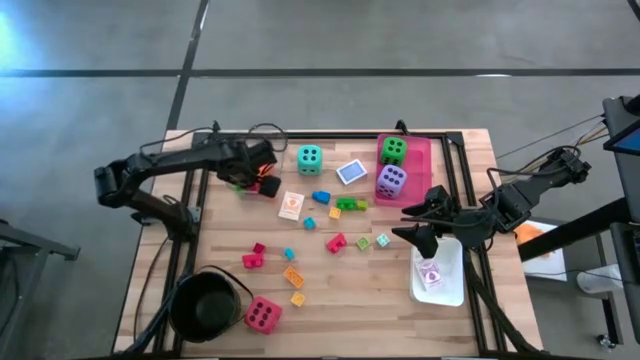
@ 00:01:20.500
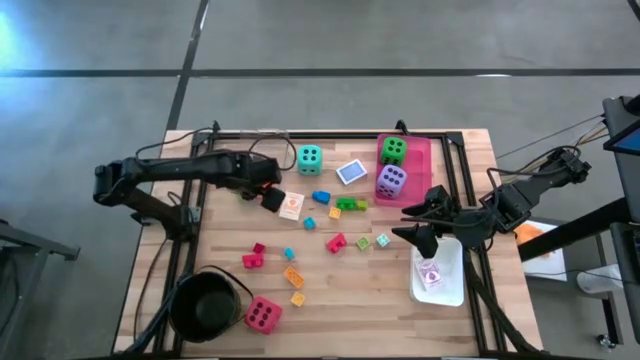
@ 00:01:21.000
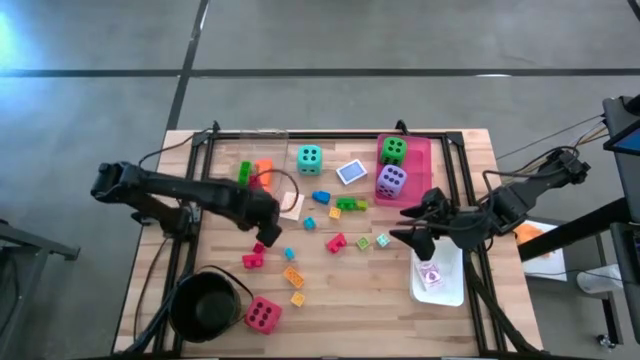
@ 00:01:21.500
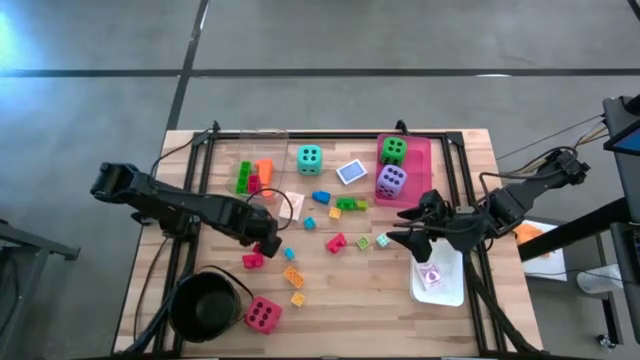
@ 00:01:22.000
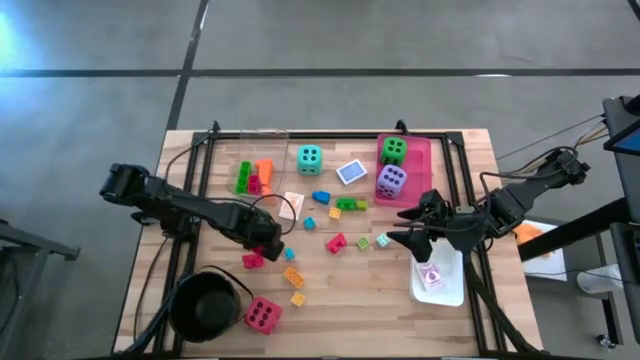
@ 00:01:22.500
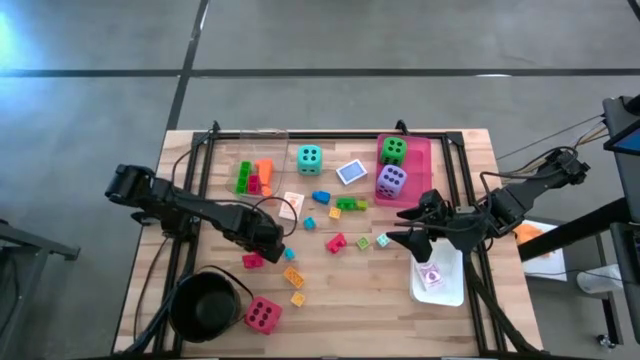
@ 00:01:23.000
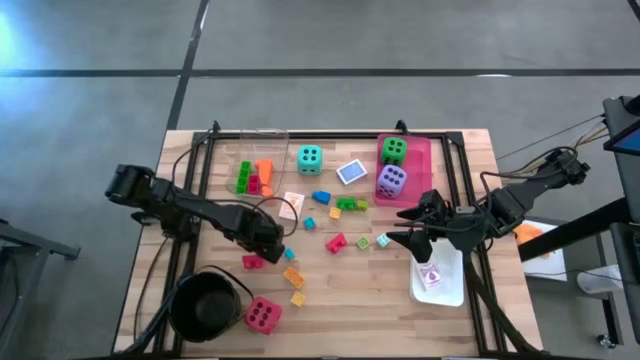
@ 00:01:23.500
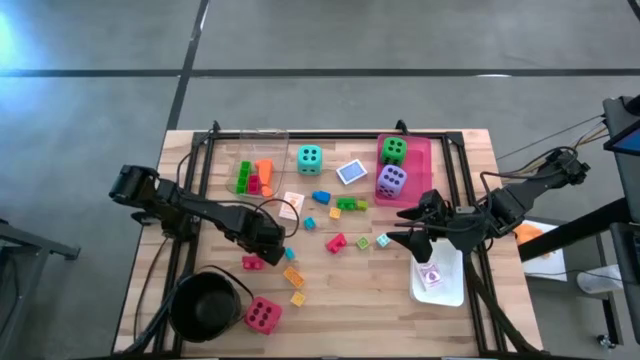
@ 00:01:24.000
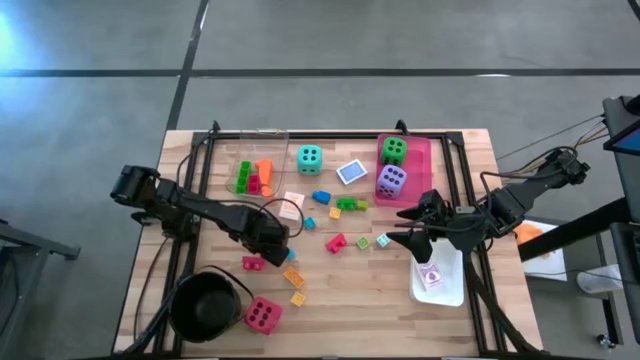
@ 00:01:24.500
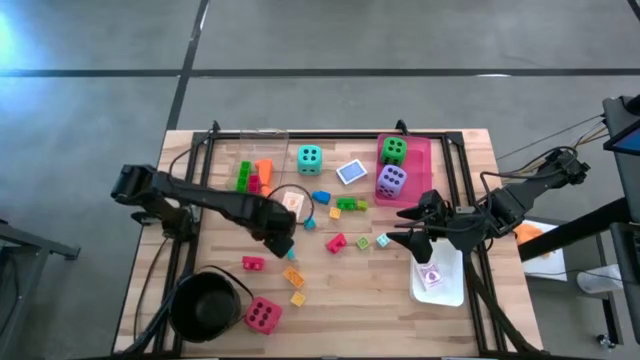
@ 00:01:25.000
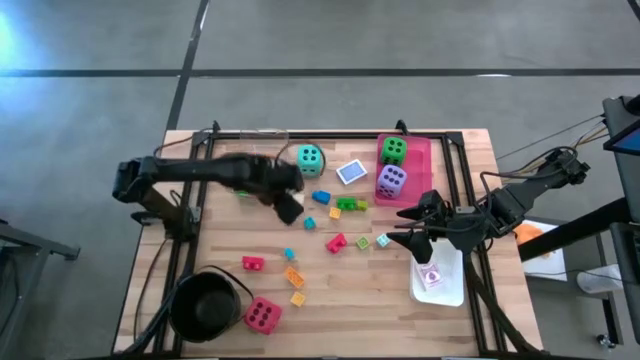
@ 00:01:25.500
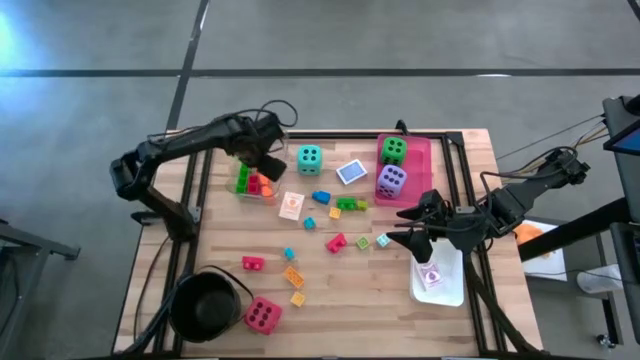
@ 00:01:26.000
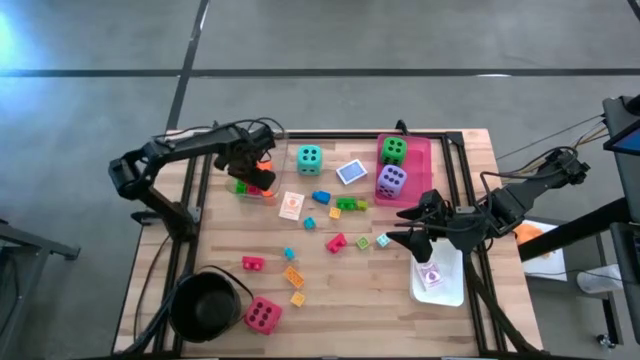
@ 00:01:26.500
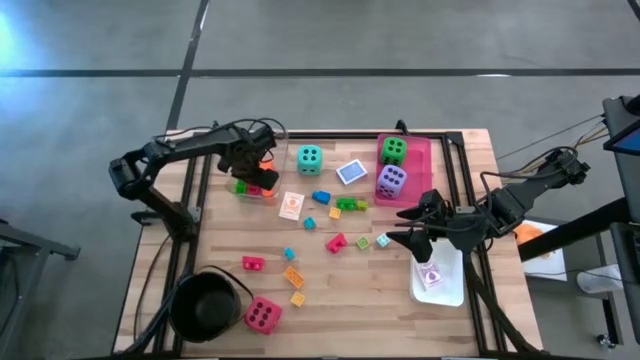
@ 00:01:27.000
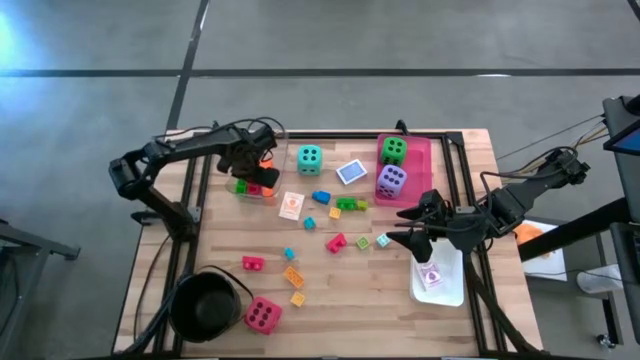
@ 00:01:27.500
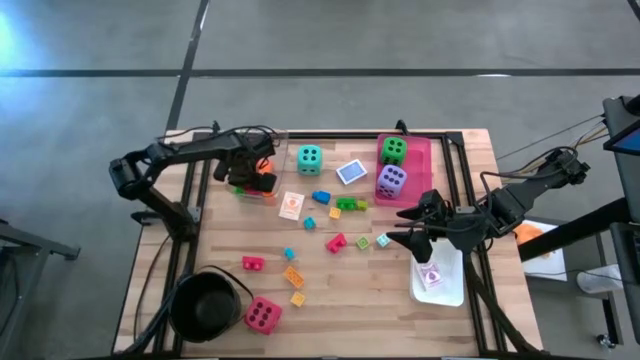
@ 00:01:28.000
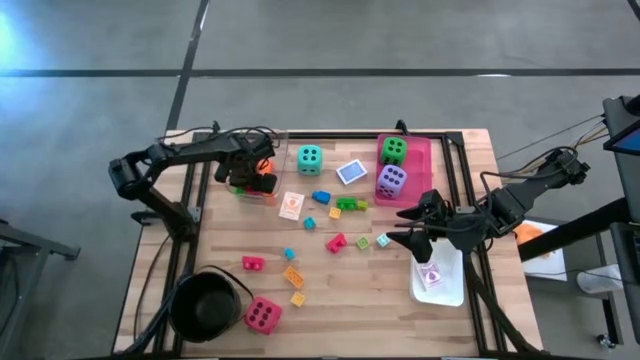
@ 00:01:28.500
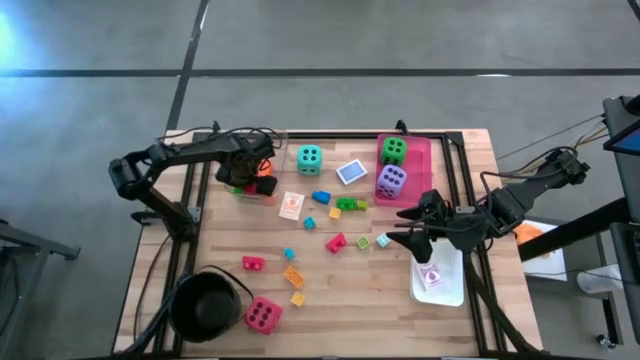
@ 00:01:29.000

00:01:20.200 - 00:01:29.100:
Task: Pick & Place Toys
Put the red game piece into the transparent bin

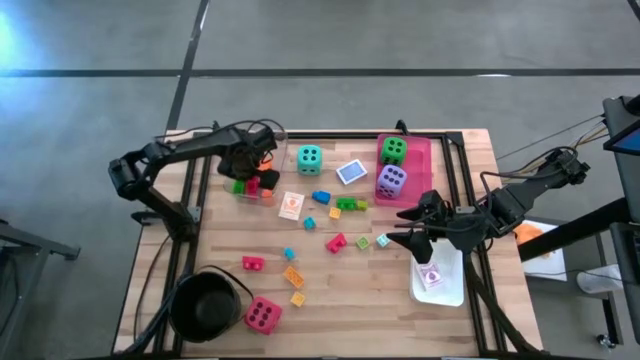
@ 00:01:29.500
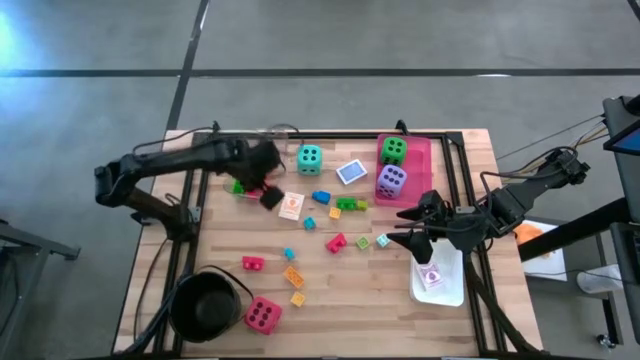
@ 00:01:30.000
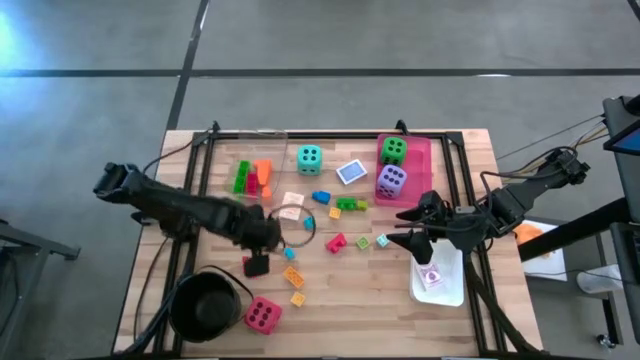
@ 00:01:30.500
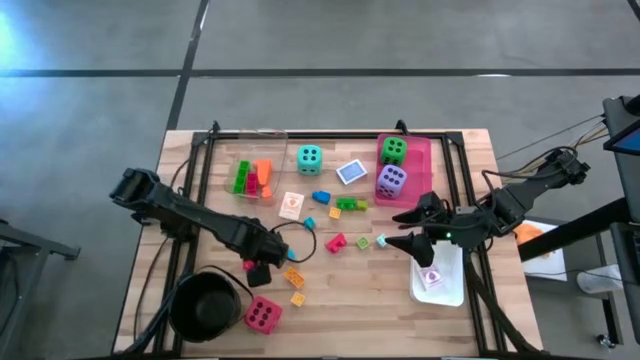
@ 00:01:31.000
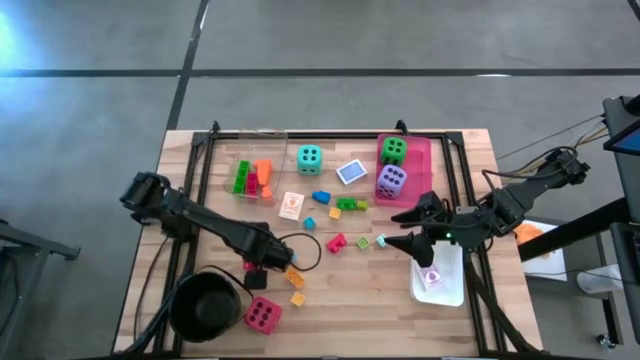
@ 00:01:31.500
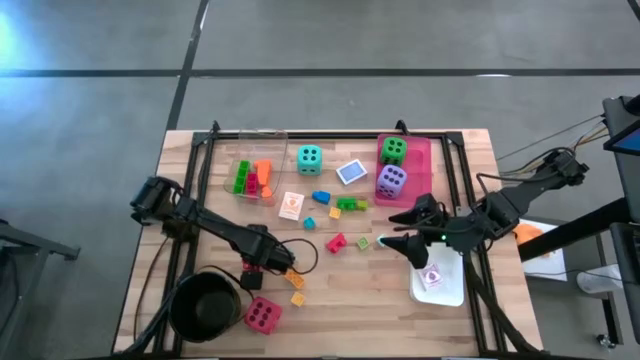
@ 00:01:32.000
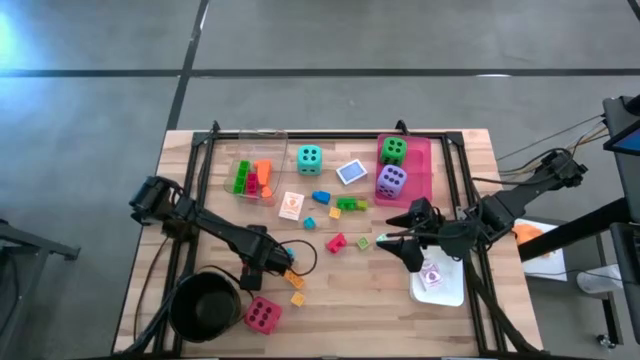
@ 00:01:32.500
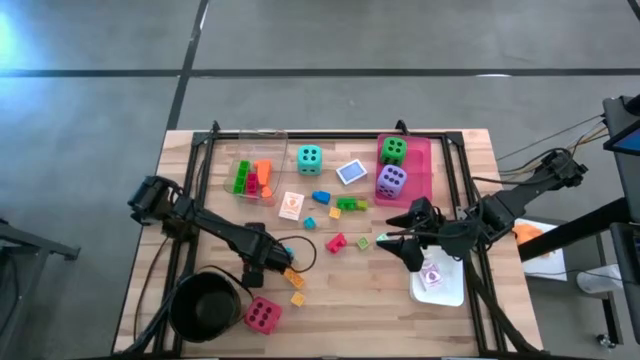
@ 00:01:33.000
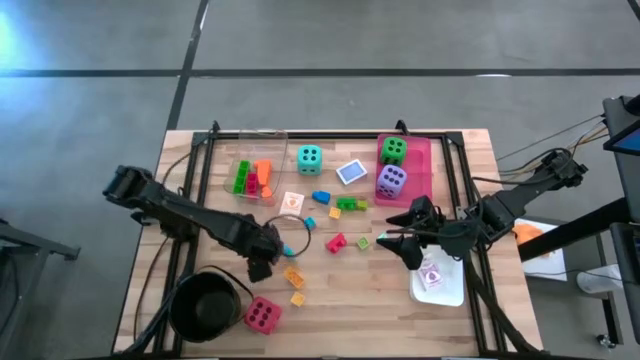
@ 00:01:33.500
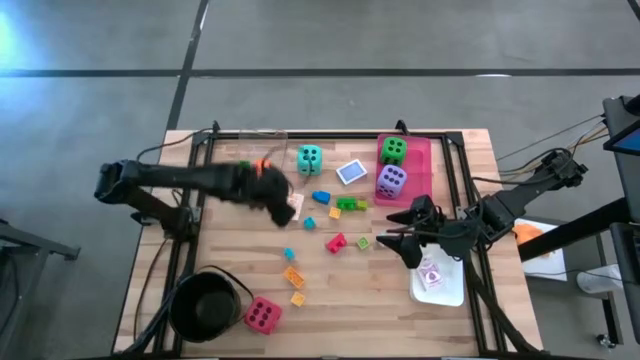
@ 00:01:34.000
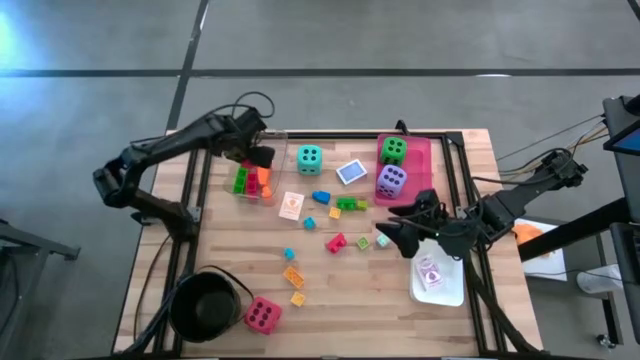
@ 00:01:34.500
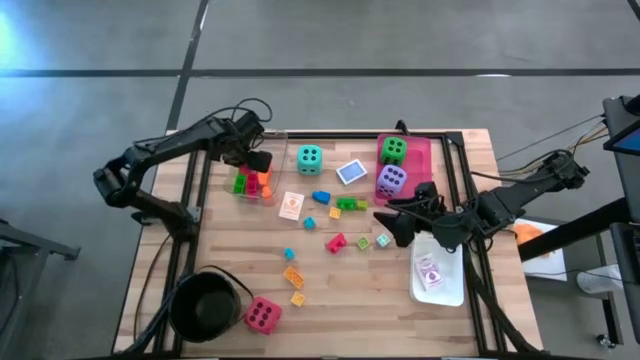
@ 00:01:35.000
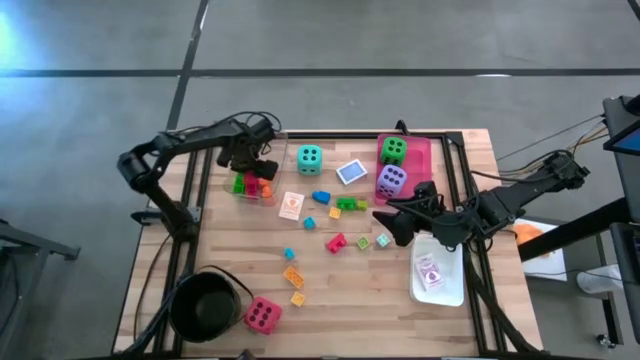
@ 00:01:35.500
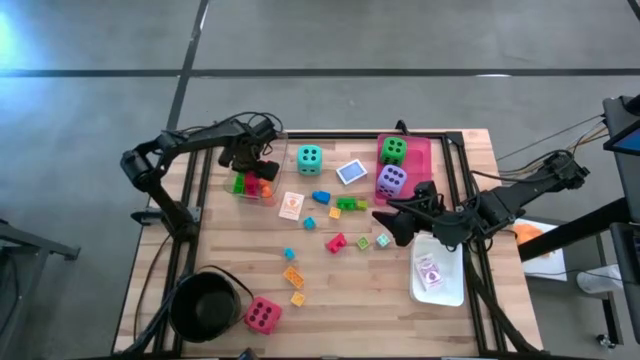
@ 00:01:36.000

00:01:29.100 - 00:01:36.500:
Put the red game piece into the transparent bin

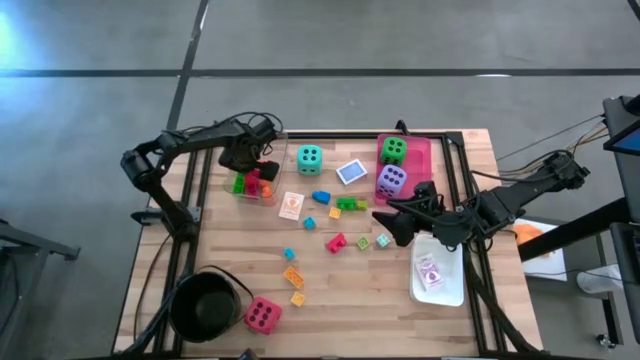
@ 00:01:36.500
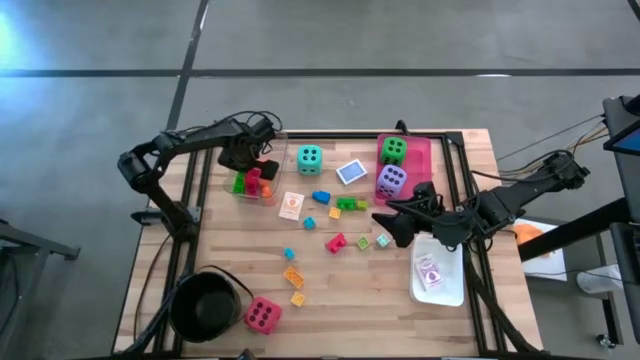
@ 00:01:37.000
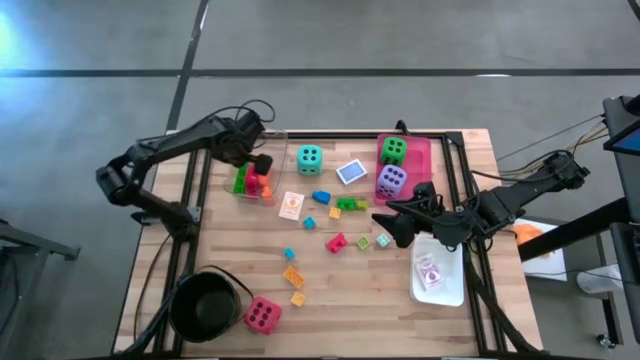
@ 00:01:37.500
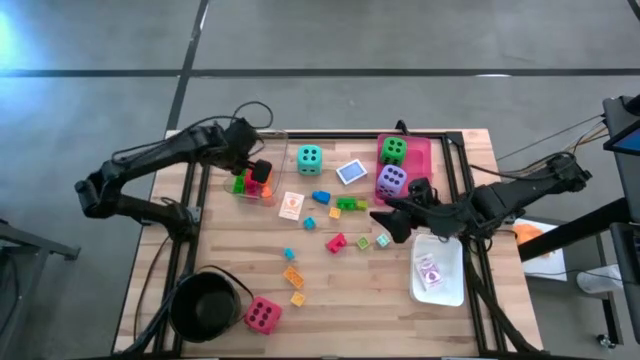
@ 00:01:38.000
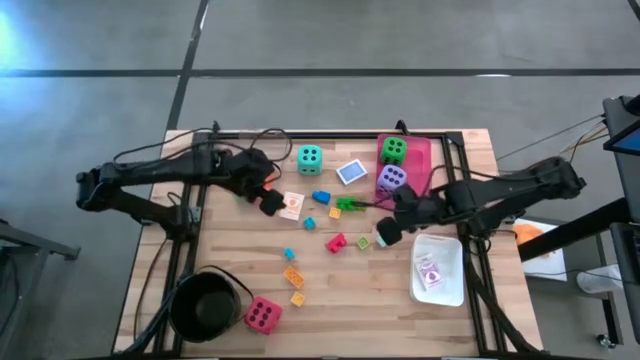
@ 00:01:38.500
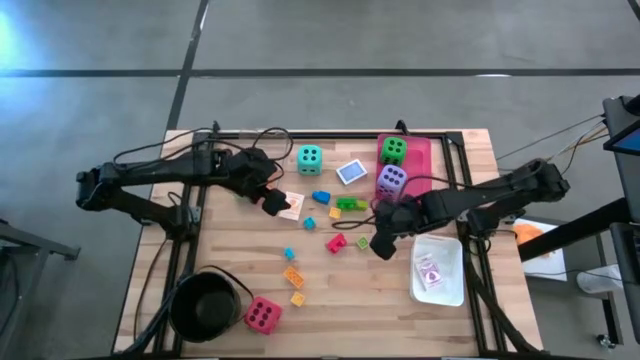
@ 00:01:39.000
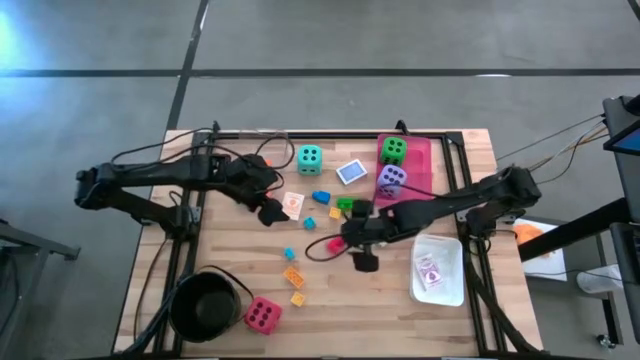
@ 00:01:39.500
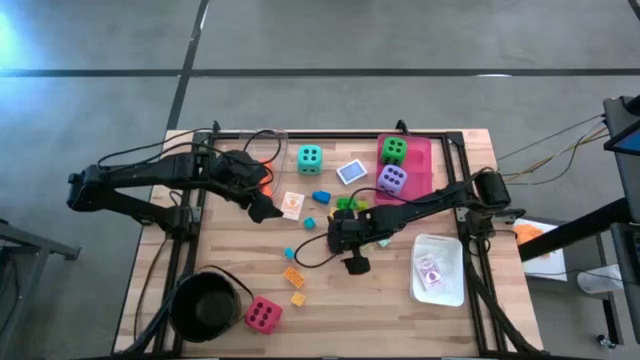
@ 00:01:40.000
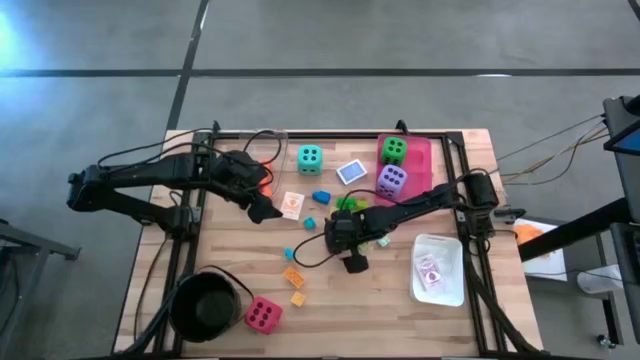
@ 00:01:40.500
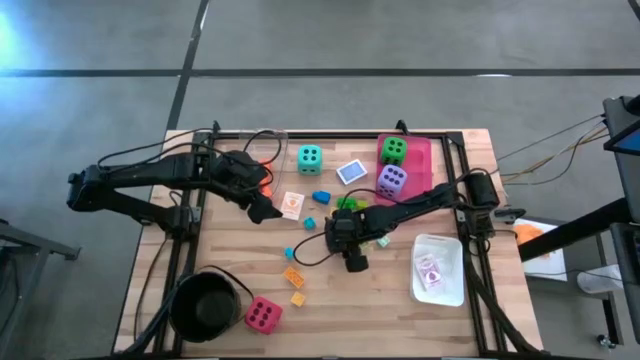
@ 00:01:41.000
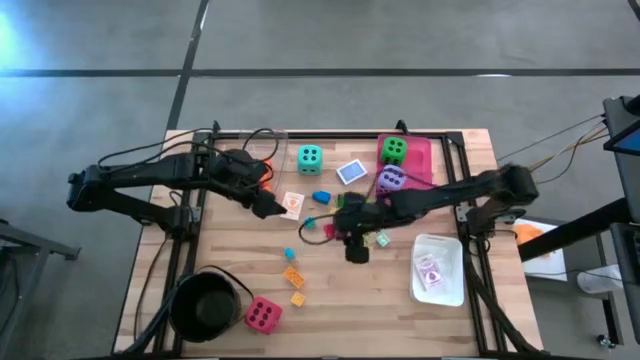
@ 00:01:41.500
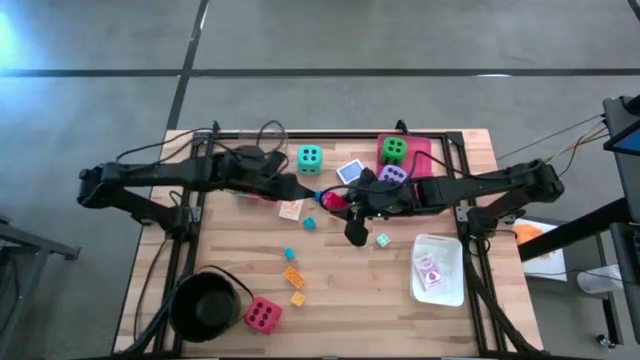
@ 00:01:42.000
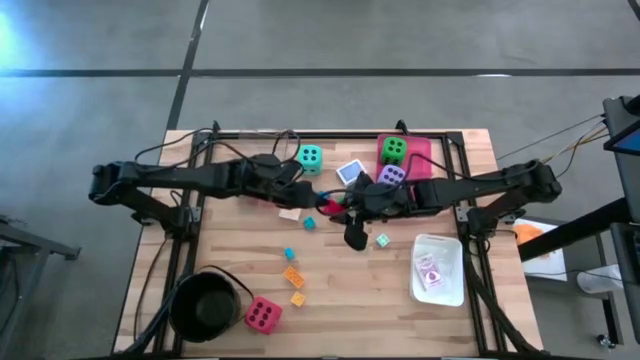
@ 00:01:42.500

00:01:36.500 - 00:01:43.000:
Put the red game piece into the transparent bin
